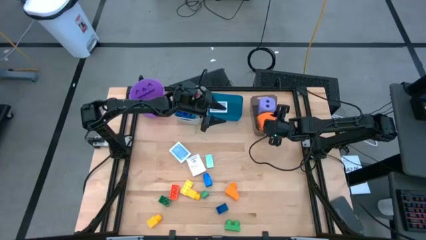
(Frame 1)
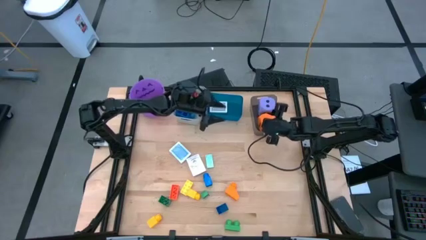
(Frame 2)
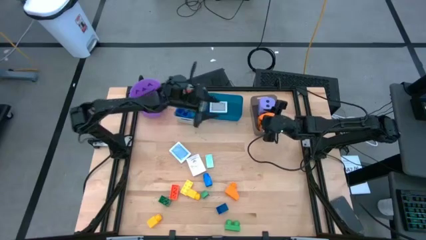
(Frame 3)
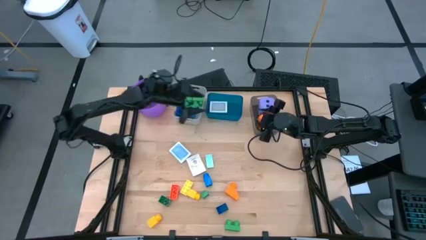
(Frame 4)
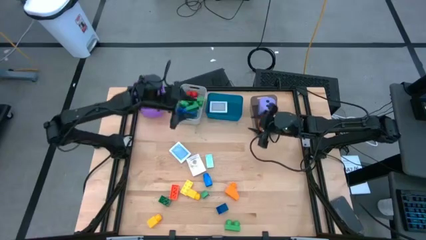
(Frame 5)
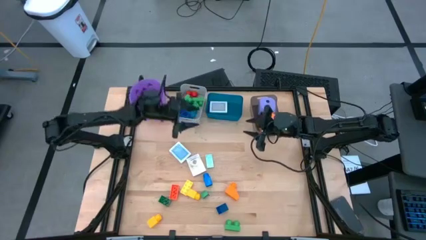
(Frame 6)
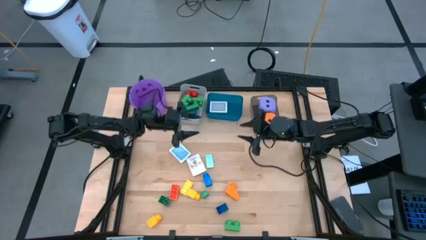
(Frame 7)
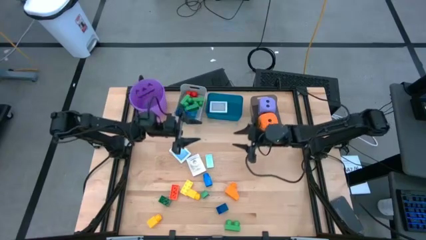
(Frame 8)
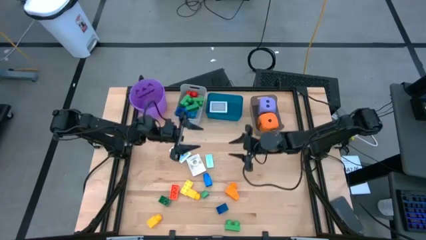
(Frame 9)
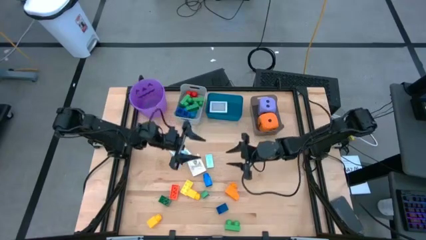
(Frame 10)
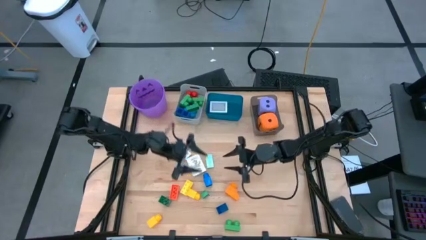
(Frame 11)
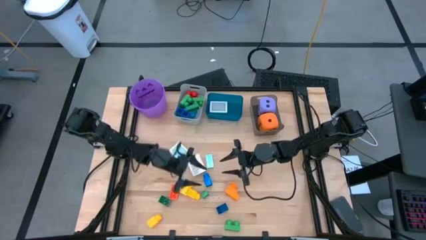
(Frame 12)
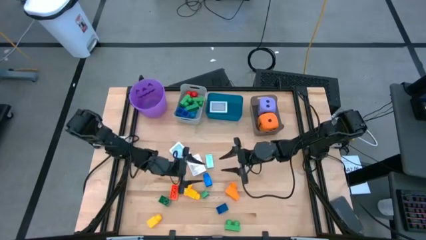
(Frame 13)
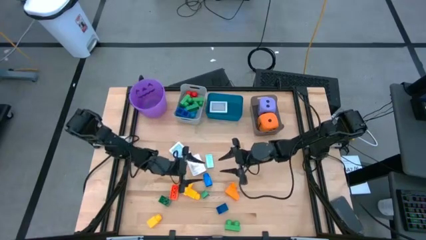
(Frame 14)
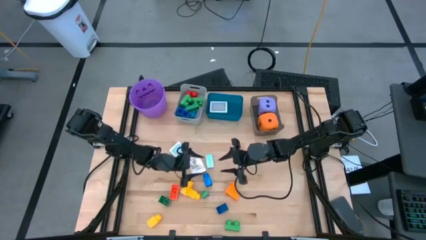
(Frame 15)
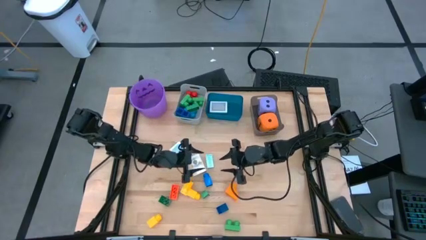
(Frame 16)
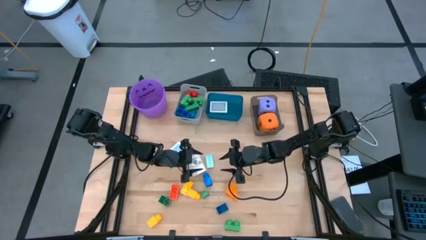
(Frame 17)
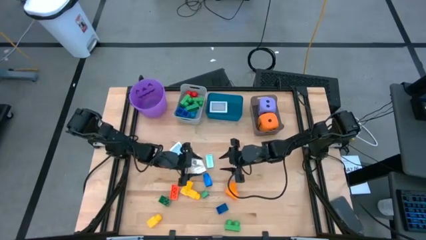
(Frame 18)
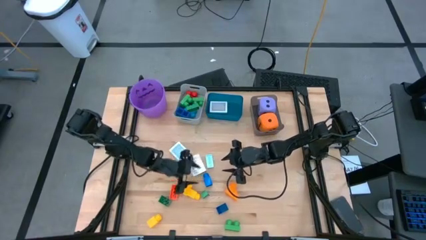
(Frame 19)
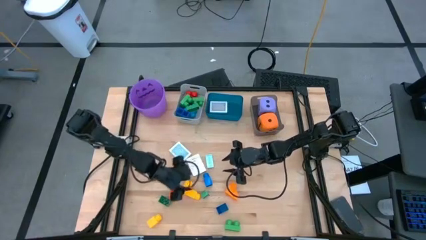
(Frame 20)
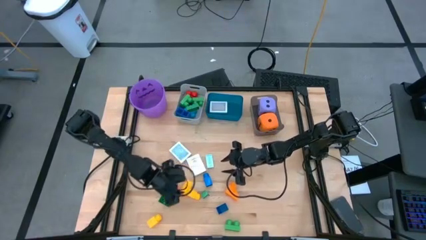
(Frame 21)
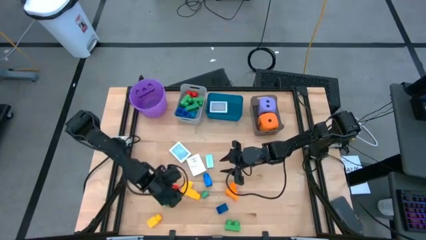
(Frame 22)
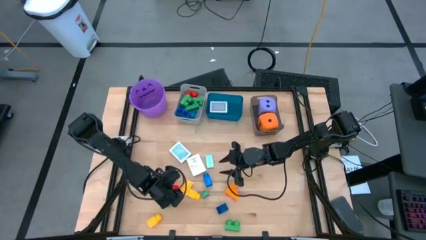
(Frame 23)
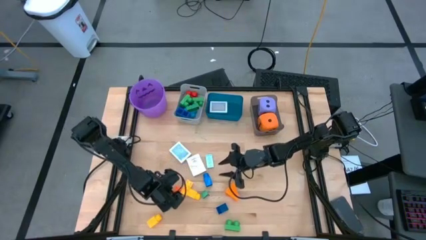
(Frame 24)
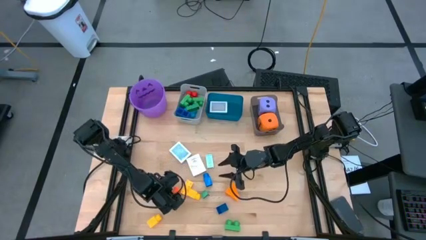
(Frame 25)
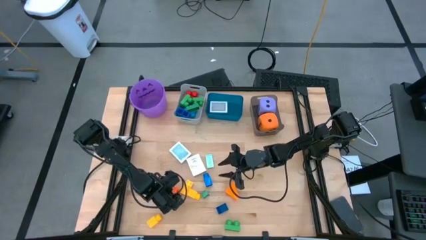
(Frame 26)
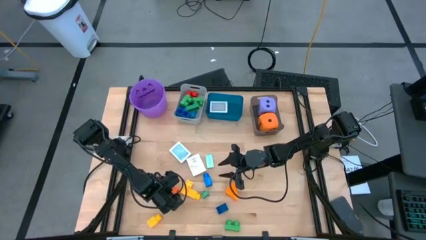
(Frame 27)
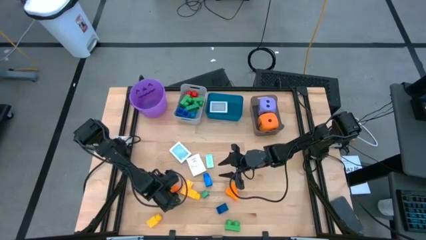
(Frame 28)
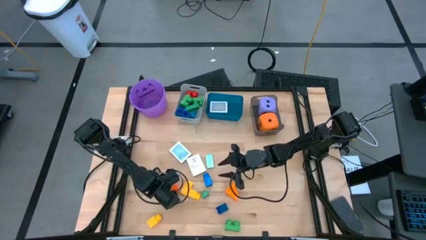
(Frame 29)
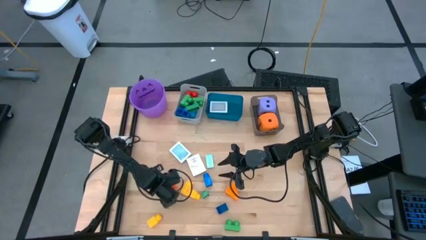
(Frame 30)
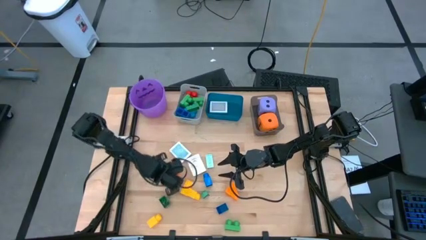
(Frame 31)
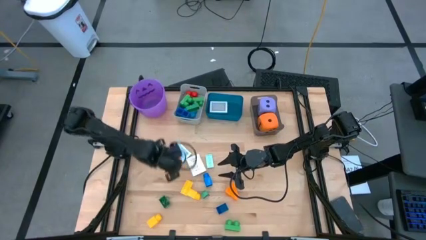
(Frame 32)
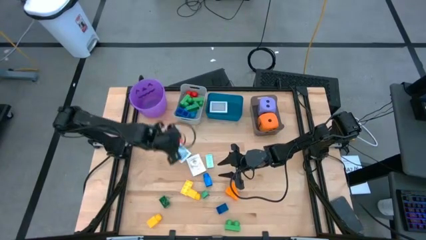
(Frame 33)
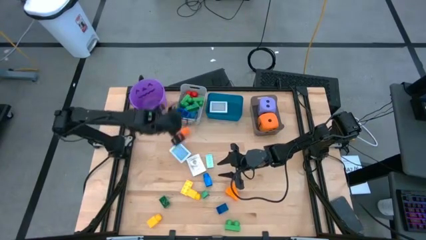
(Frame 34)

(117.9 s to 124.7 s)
Task: Pick & Place Toys
Put the orange game piece into the gray bin

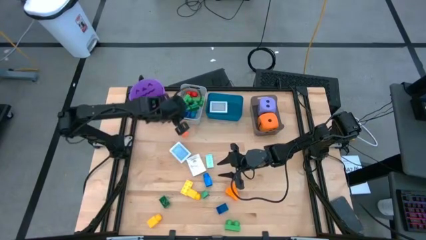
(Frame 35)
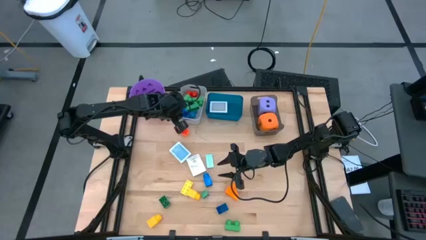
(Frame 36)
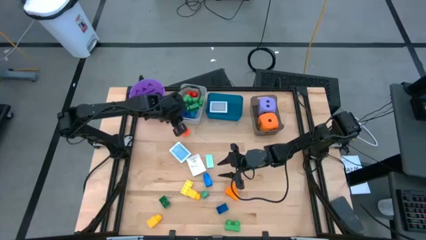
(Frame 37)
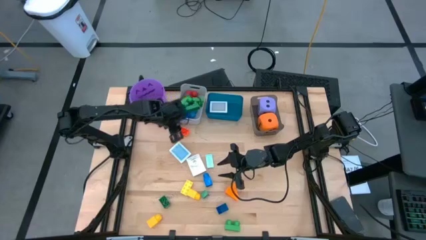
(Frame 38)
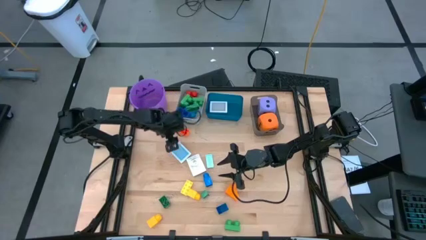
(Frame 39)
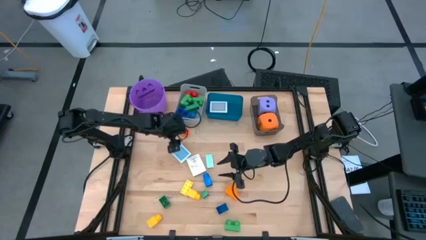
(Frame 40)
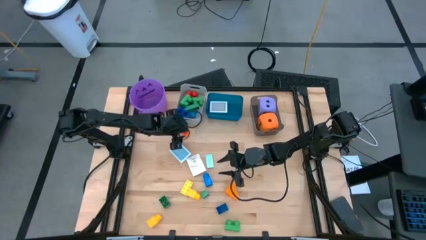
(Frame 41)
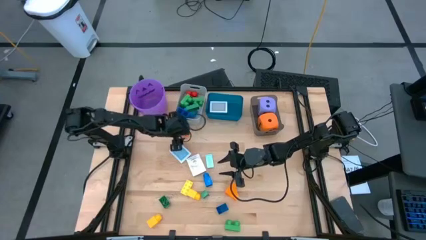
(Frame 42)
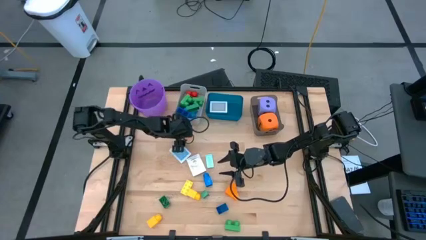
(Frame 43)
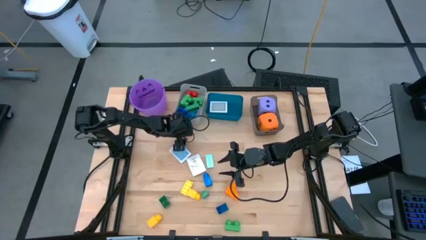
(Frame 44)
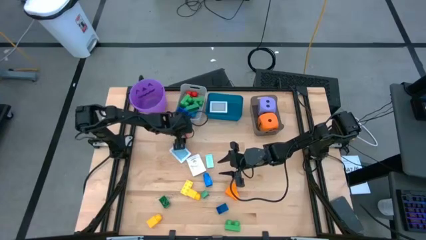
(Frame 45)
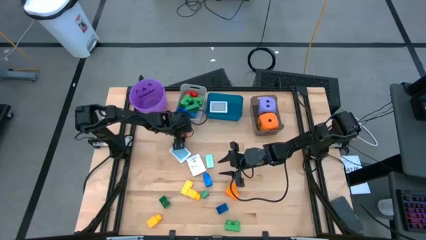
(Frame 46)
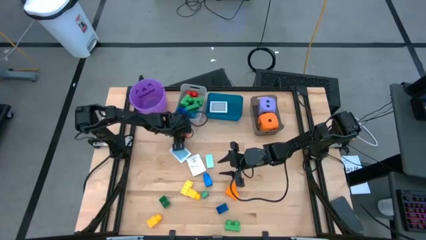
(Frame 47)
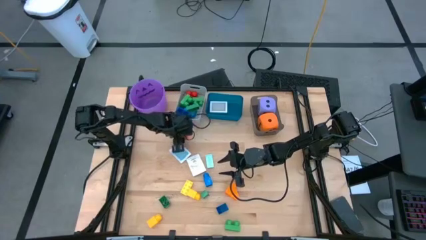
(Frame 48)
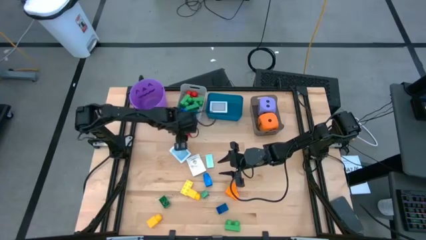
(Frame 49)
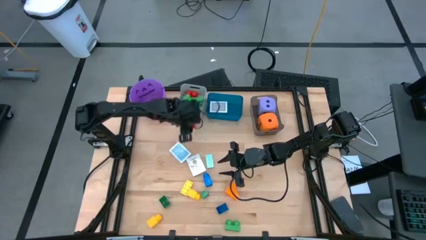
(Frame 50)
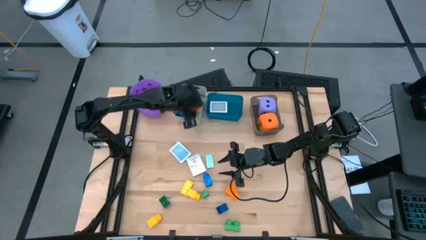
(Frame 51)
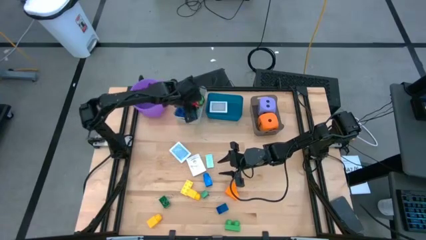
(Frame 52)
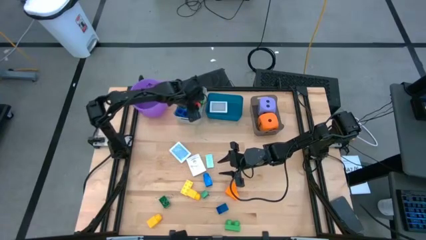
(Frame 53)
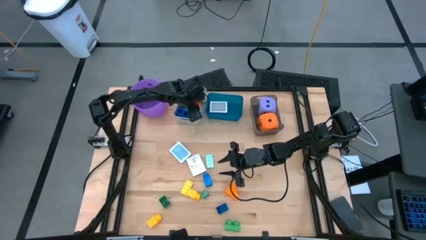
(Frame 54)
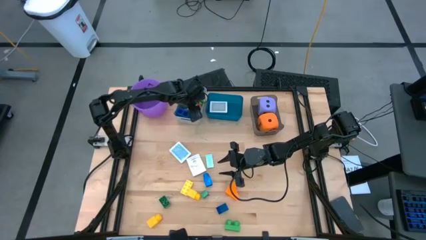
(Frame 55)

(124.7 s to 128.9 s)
Put the orange game piece into the gray bin

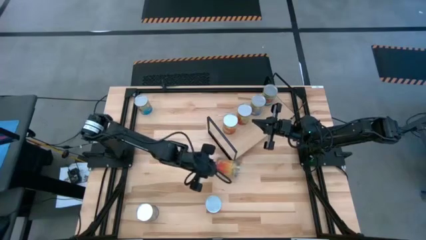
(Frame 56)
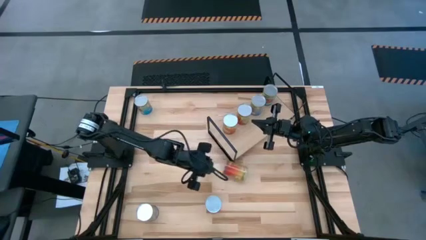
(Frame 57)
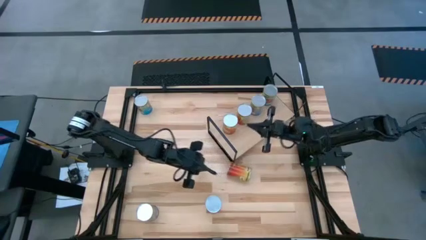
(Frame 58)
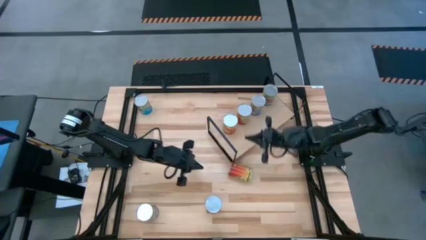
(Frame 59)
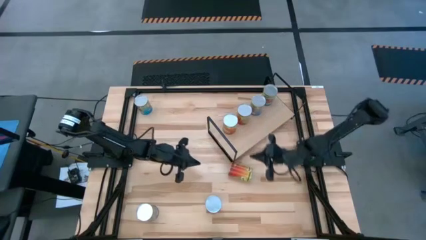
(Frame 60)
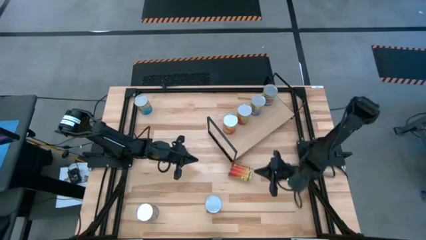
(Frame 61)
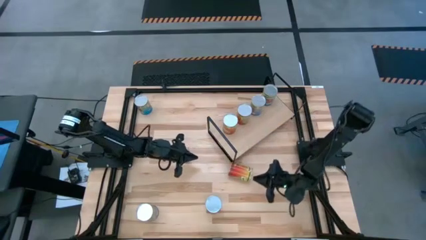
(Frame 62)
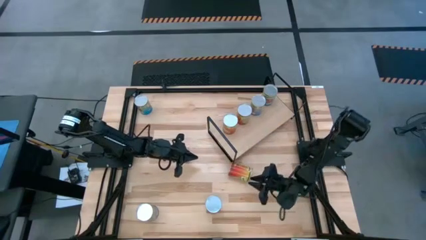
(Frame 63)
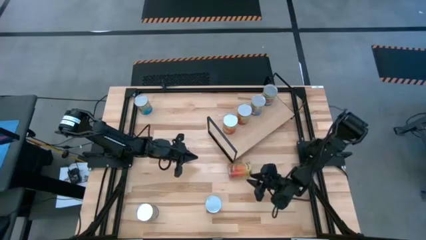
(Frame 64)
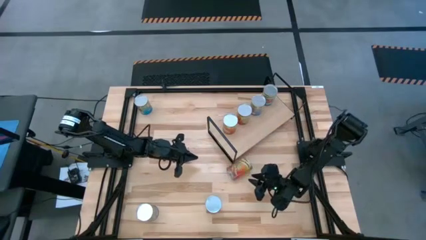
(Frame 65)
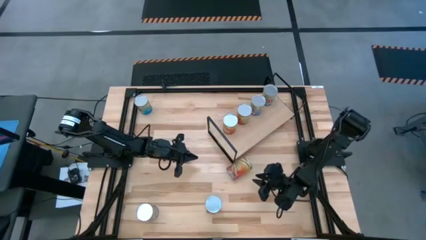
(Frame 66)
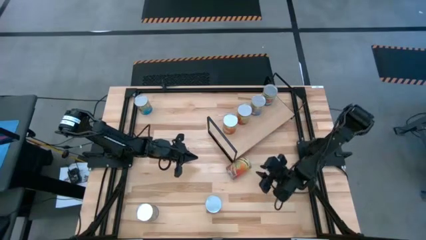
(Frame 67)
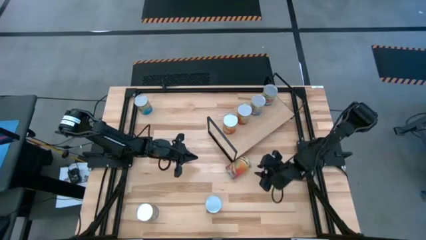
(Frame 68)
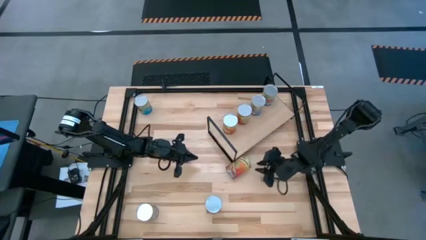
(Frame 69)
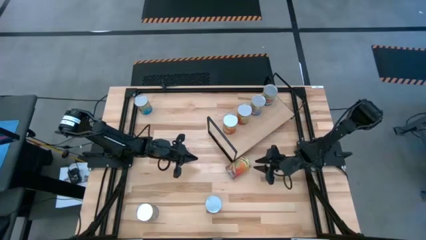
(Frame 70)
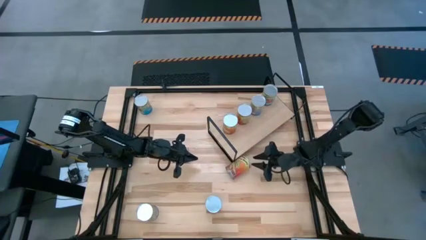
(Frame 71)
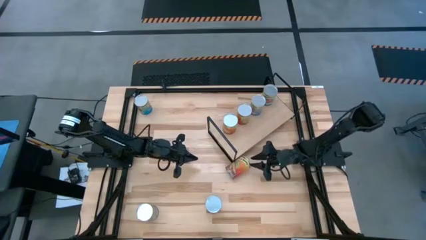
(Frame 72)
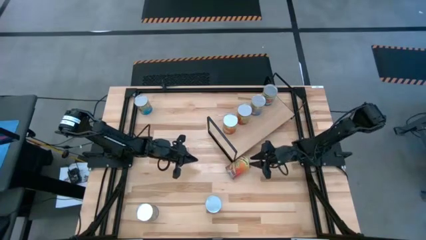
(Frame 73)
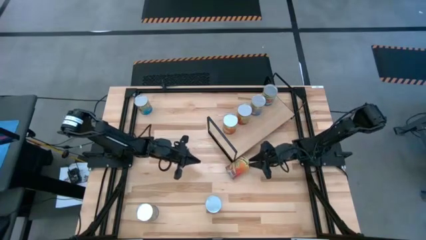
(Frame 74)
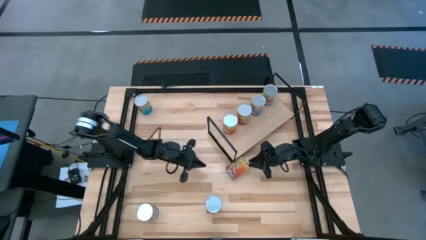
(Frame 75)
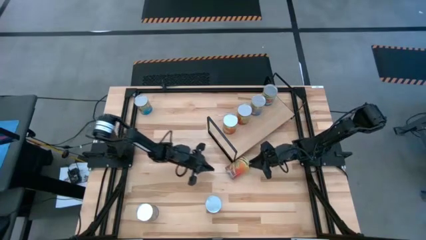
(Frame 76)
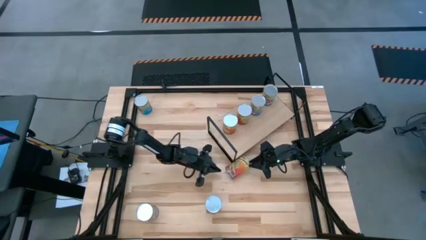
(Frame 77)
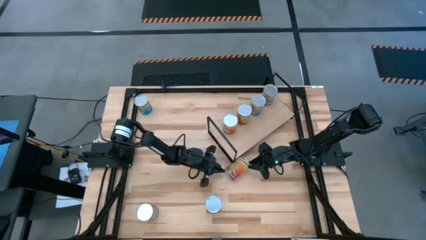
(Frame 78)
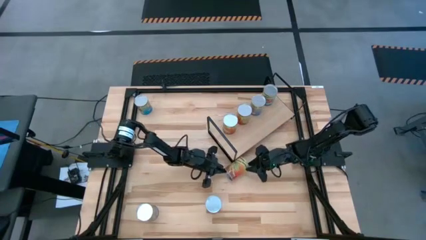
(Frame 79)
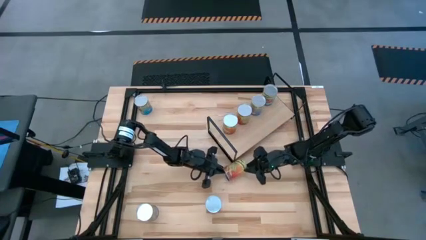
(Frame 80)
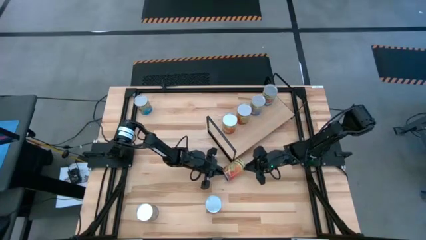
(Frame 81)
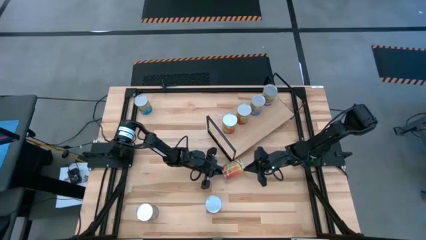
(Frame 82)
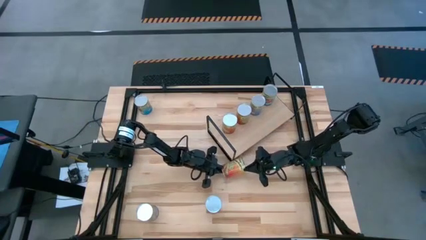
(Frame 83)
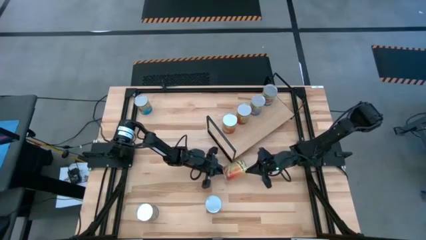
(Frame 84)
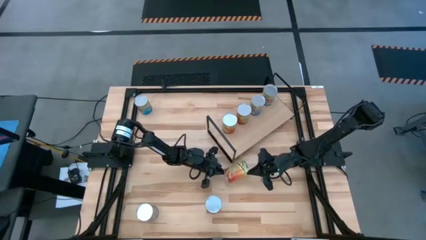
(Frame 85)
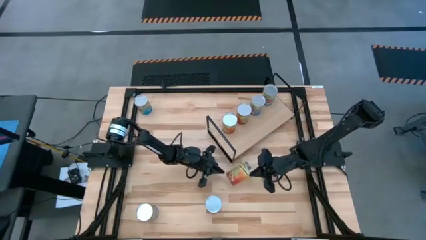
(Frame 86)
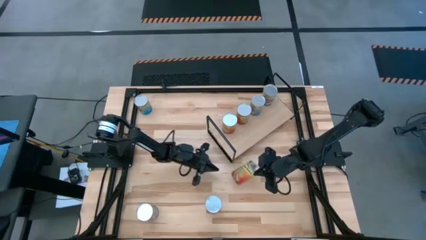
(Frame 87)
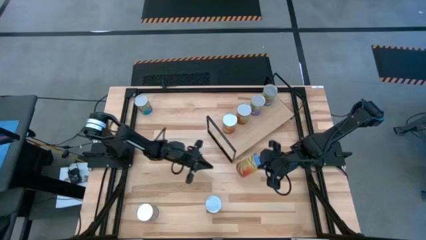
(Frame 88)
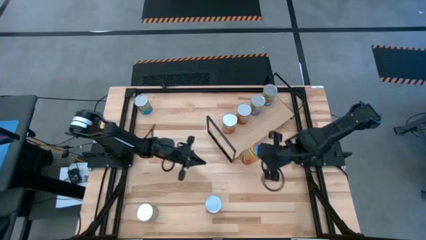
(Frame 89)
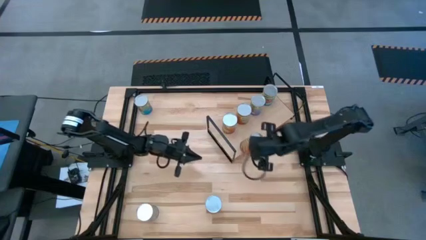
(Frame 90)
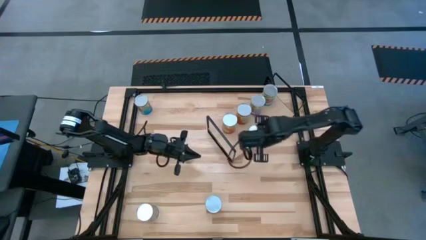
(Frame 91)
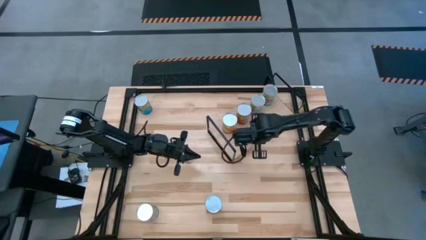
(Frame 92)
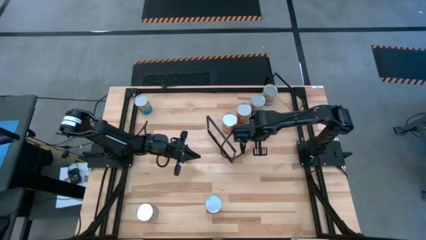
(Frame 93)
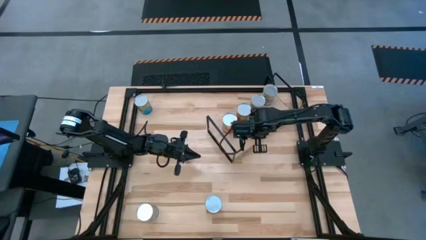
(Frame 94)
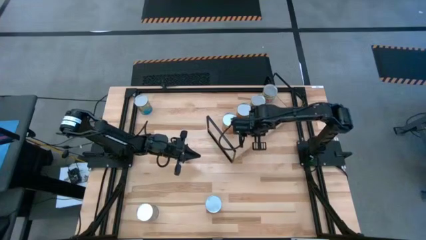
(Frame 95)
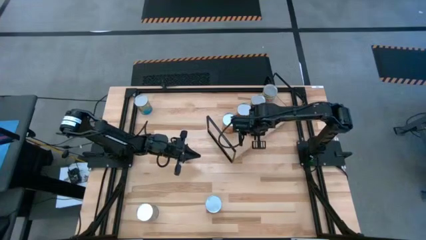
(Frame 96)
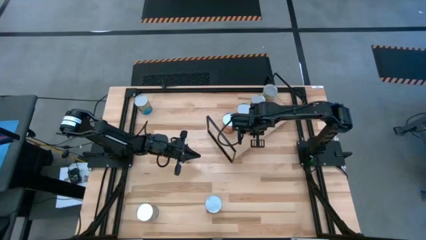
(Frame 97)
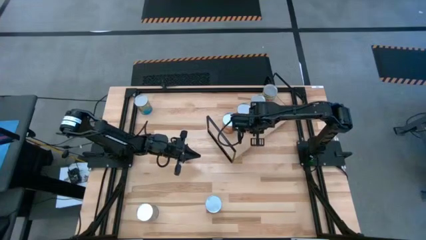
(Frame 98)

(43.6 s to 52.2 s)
Task: Pick and place cans onto a shelf
Put the canned green beans on the shelf aligned with the other canned green beans
